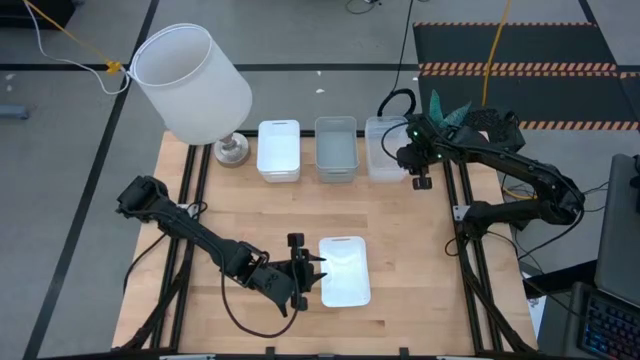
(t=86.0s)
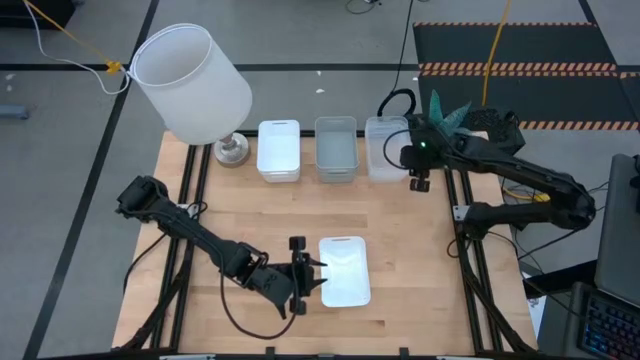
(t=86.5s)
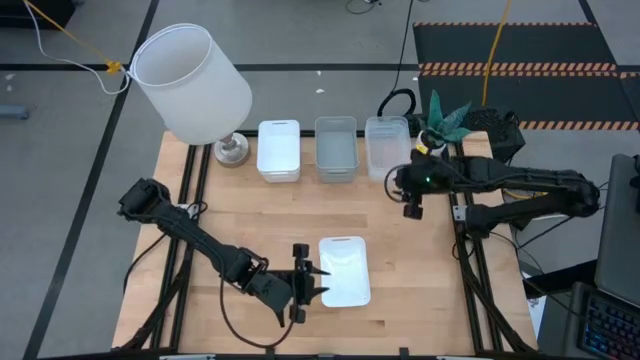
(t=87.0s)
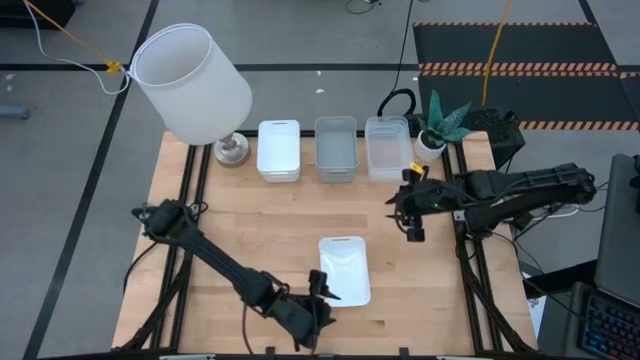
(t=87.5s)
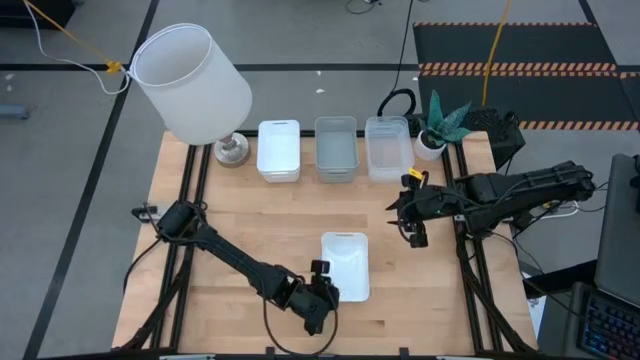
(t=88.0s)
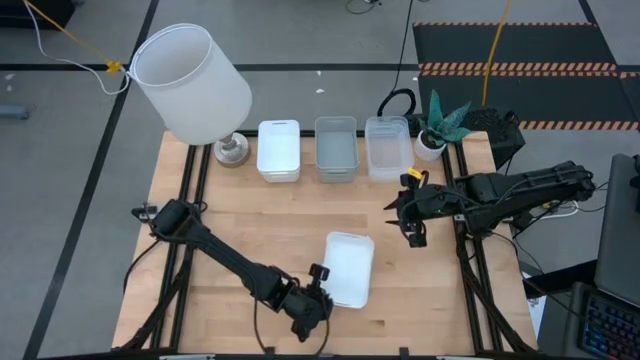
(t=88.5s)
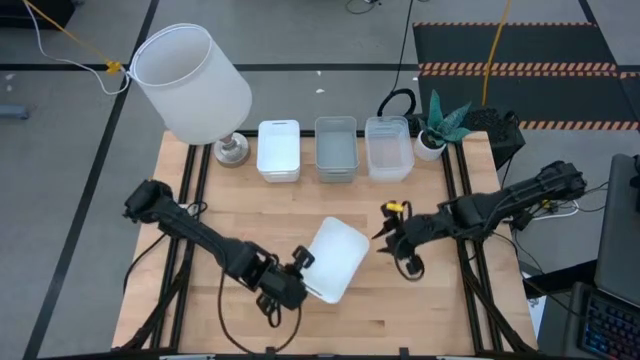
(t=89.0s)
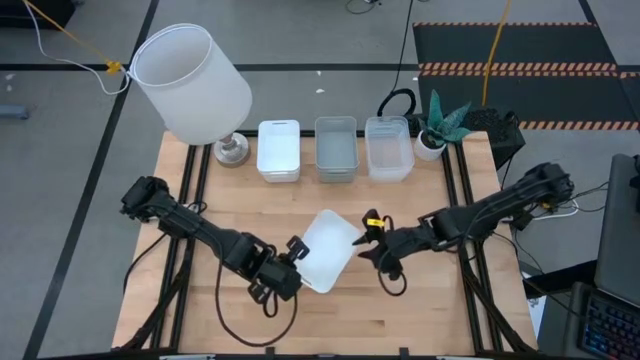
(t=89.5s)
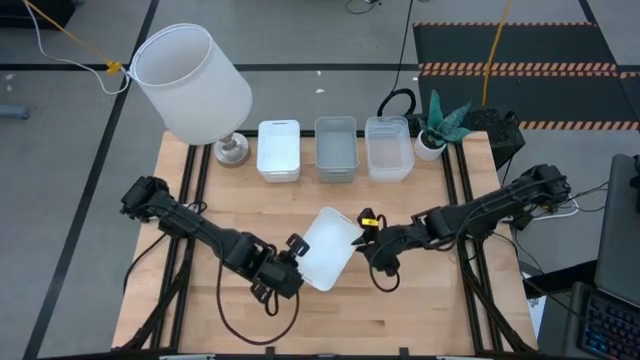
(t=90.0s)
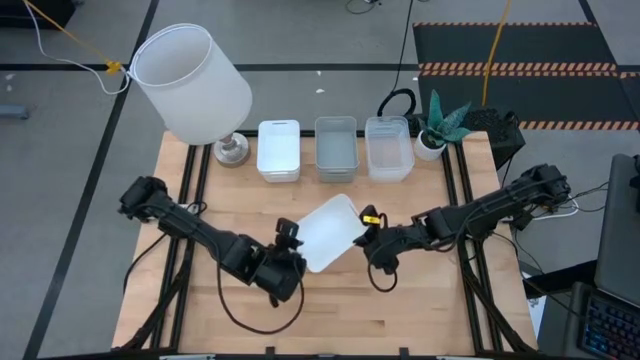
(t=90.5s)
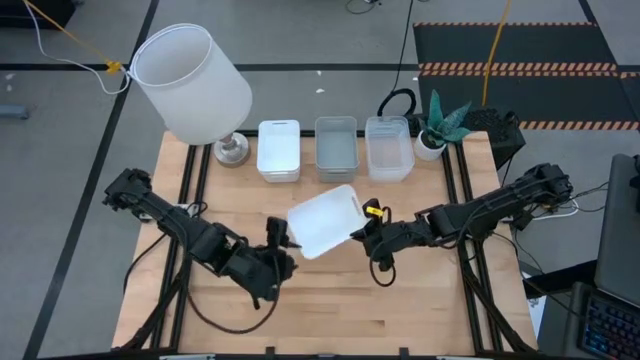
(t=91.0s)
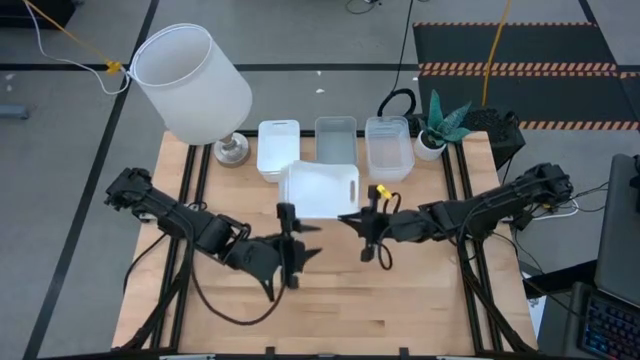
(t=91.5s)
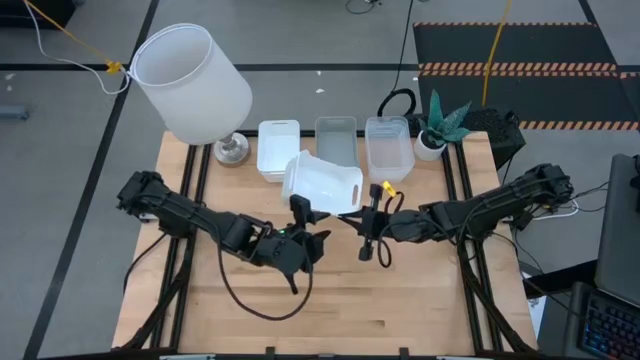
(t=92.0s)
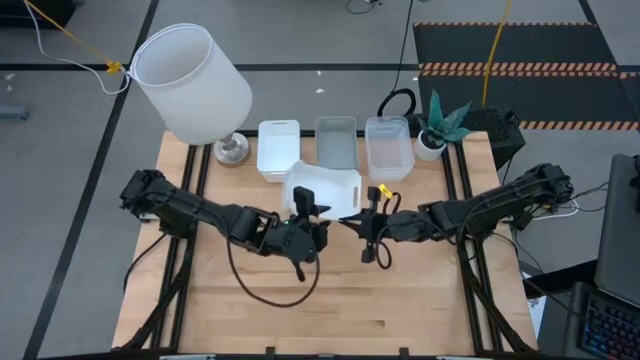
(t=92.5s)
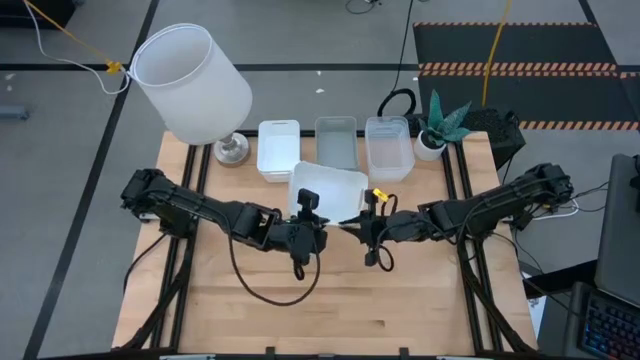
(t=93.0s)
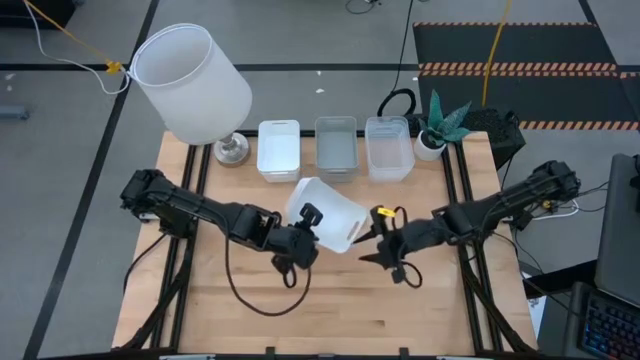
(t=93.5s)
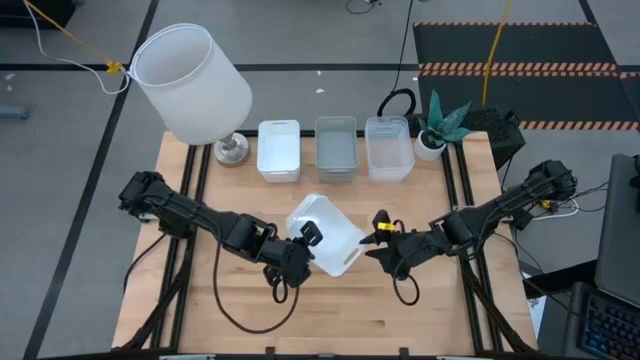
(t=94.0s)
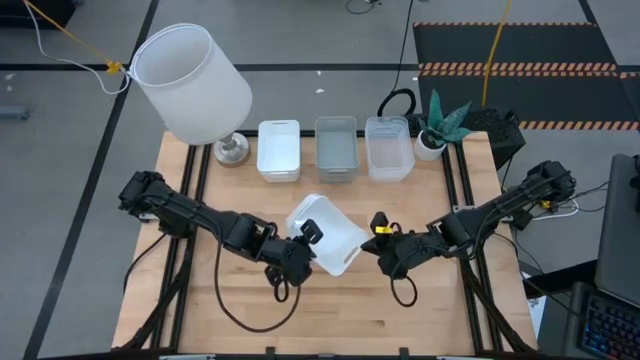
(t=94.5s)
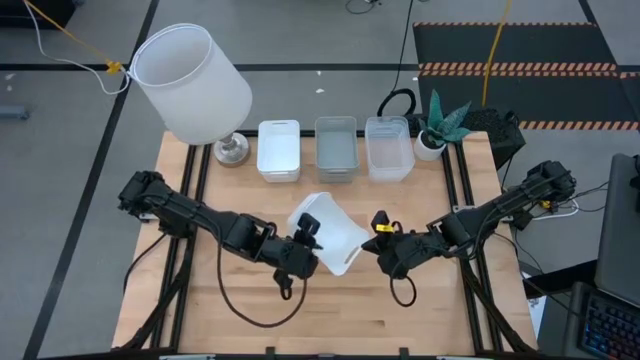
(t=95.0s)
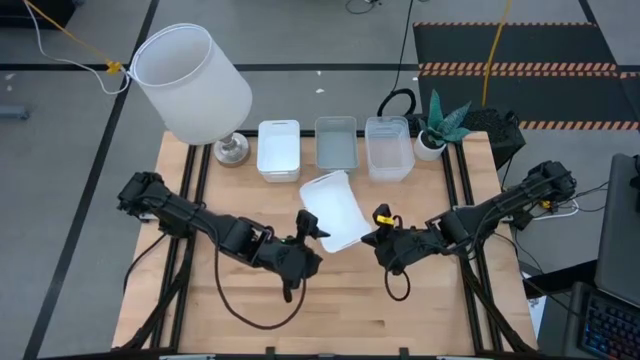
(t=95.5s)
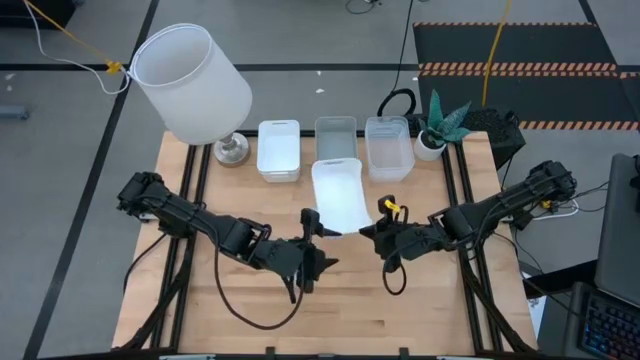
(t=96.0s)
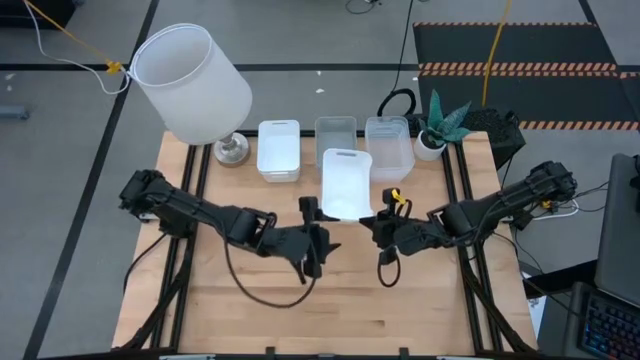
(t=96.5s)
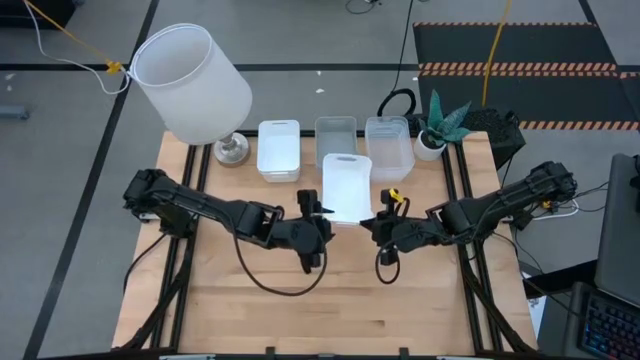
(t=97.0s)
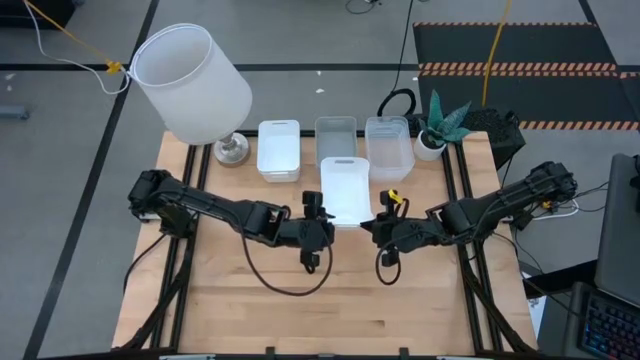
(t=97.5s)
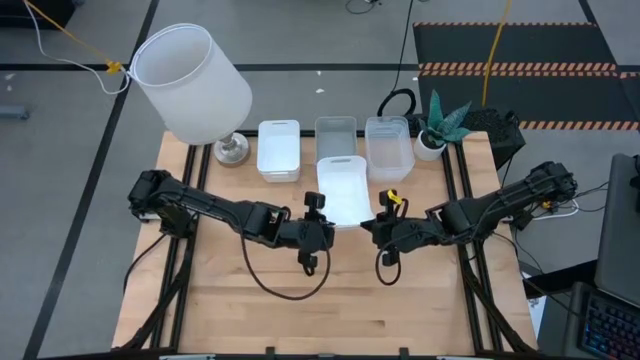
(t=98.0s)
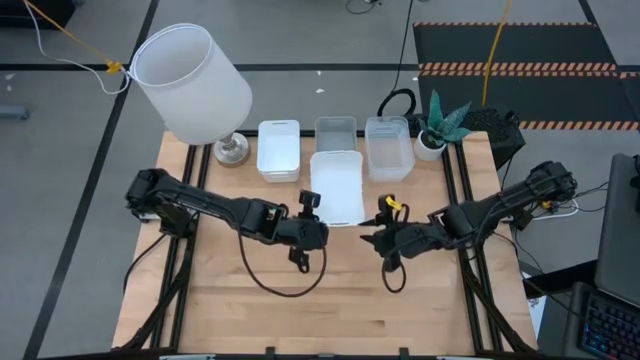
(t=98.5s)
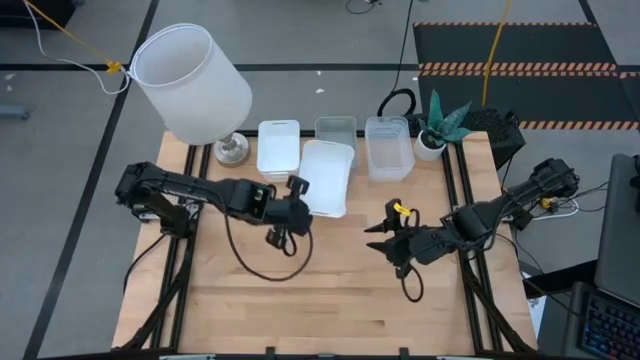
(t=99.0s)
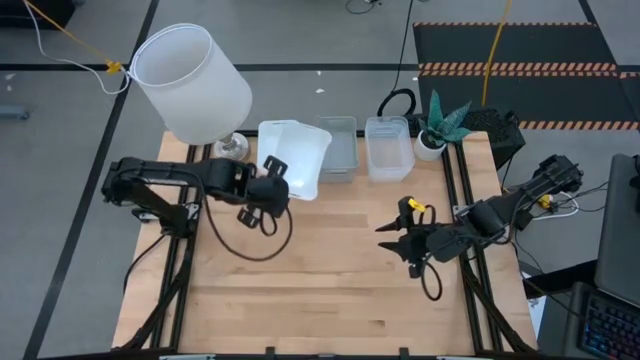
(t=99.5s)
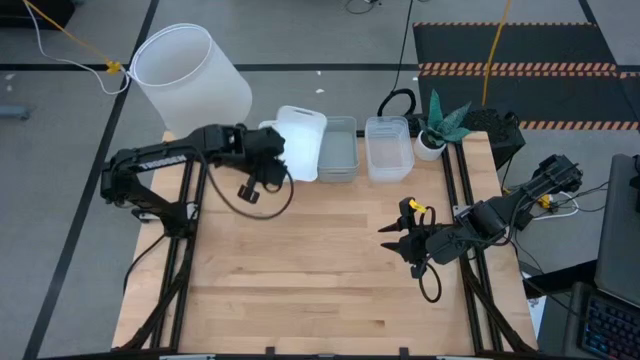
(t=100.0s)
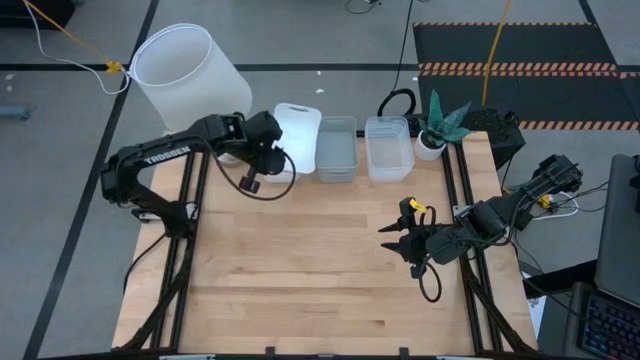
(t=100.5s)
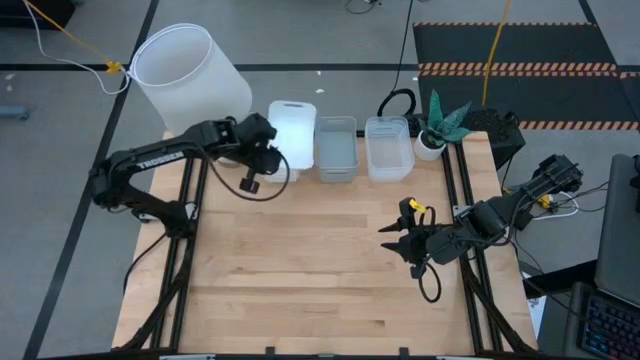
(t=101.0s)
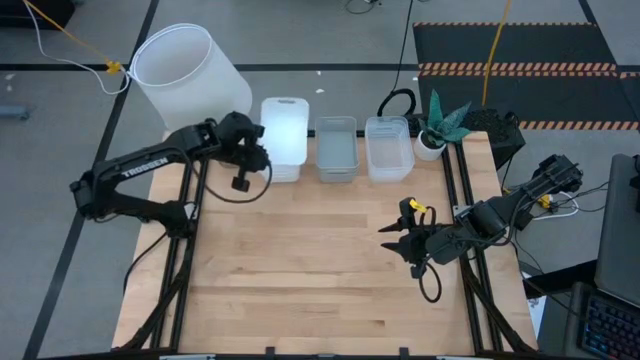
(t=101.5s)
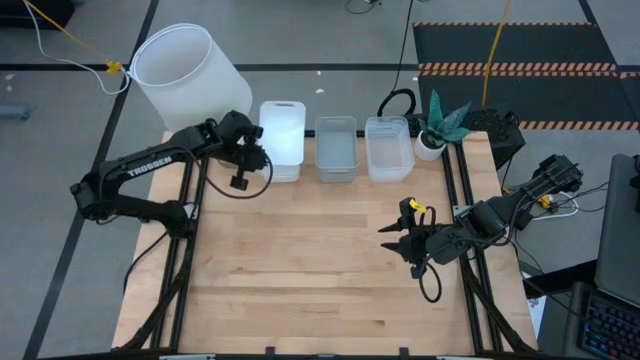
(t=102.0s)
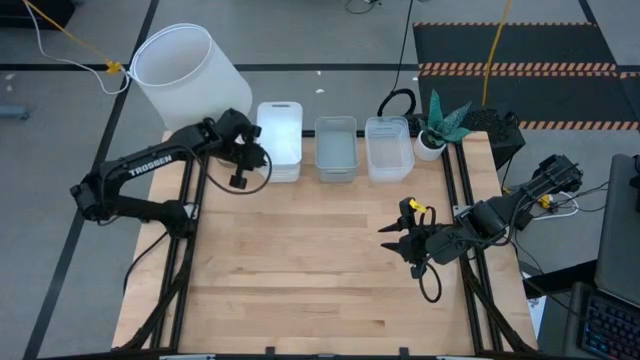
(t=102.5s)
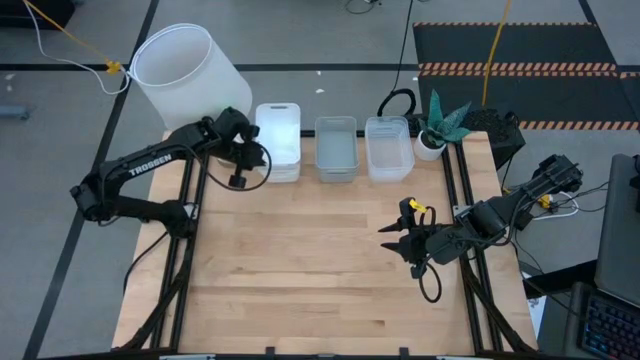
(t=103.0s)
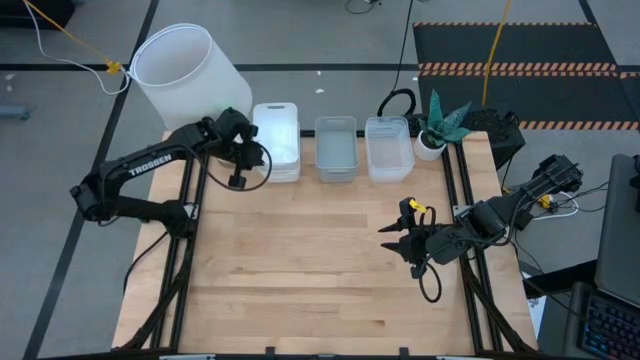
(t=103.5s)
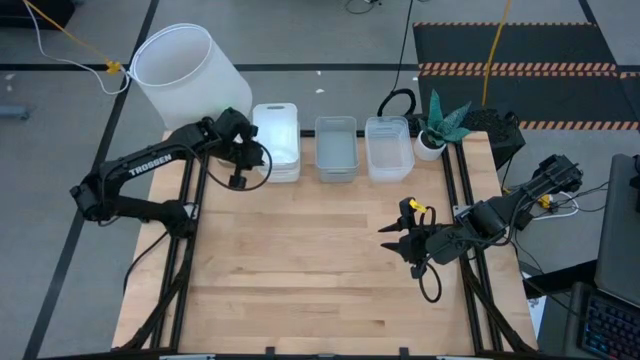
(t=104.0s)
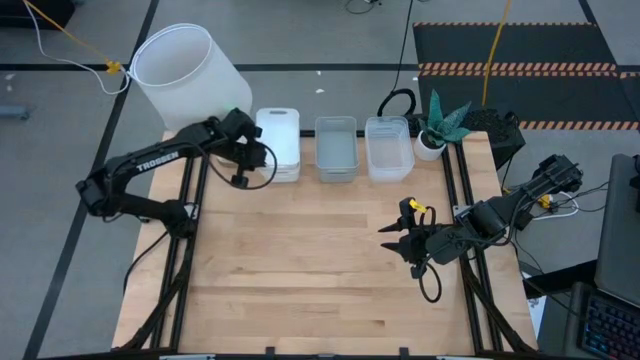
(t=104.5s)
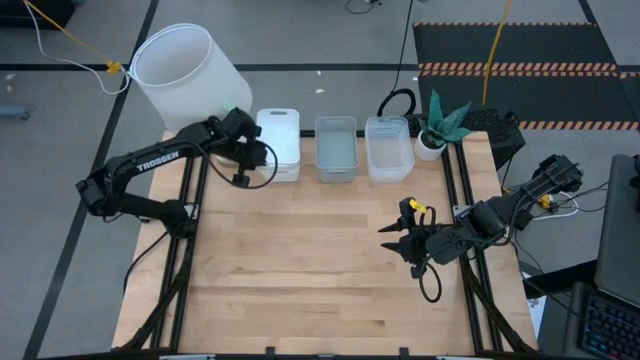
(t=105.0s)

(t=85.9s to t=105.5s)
Stack the white bin on the top left stacked white bins
